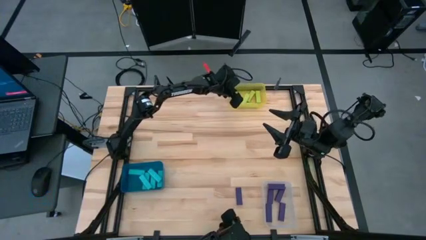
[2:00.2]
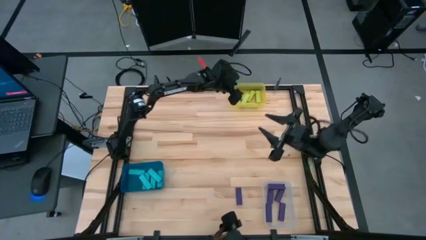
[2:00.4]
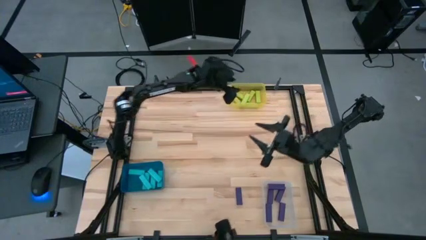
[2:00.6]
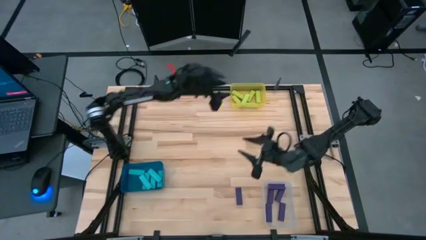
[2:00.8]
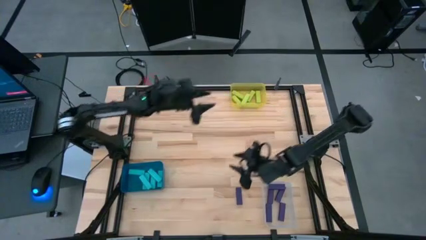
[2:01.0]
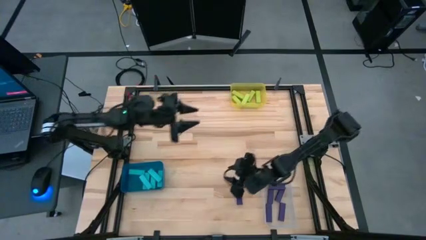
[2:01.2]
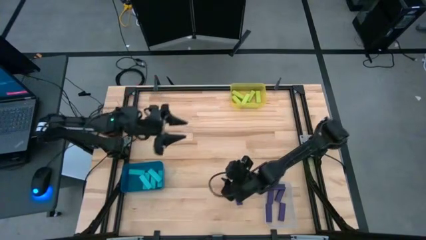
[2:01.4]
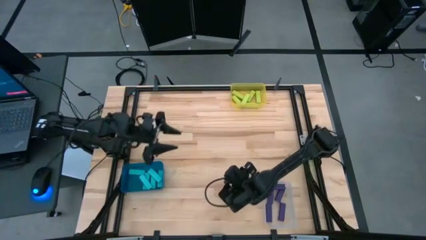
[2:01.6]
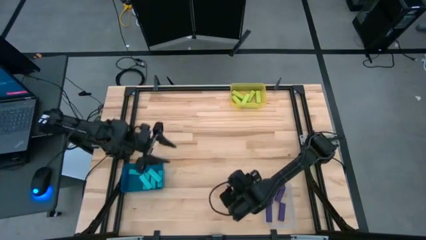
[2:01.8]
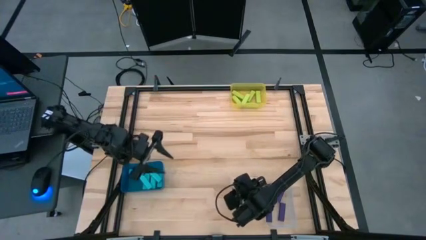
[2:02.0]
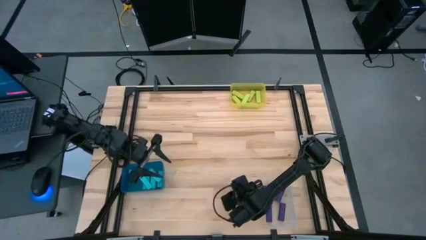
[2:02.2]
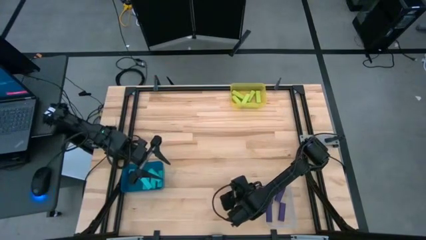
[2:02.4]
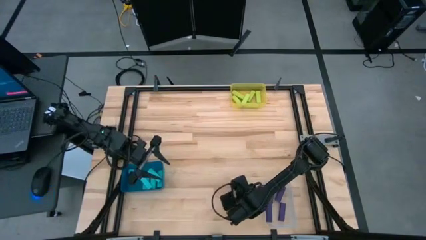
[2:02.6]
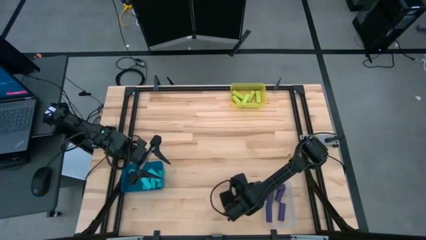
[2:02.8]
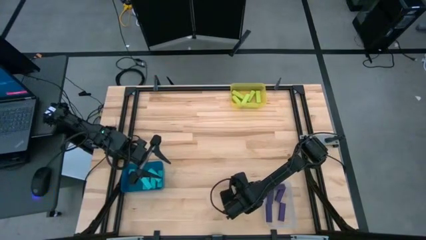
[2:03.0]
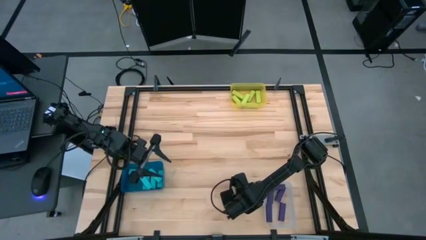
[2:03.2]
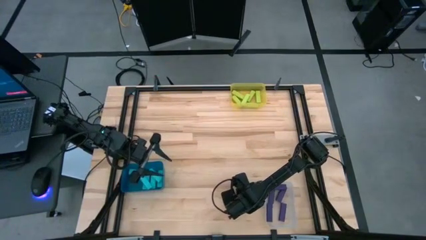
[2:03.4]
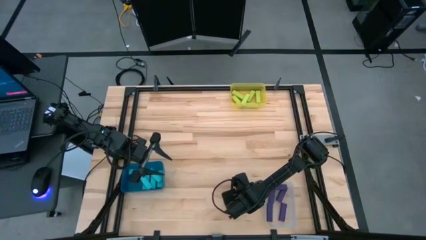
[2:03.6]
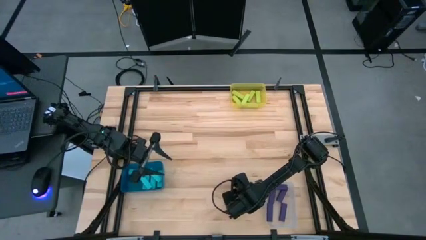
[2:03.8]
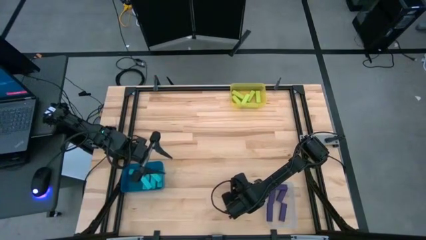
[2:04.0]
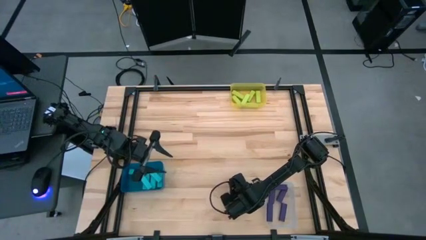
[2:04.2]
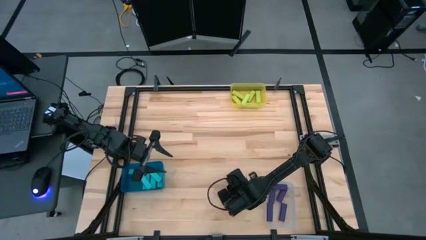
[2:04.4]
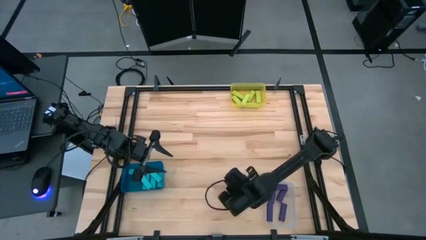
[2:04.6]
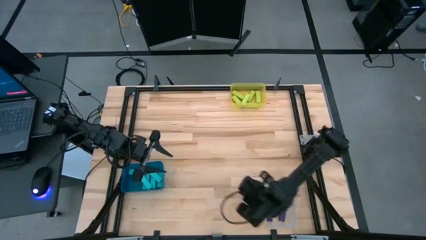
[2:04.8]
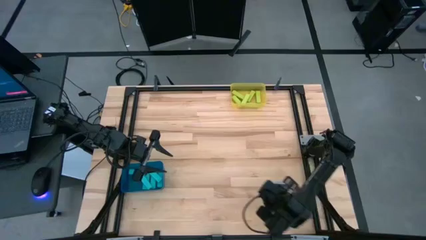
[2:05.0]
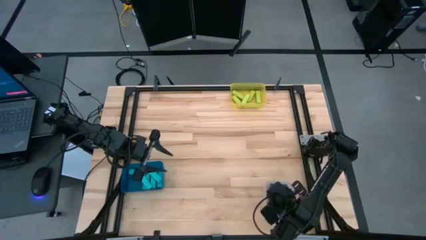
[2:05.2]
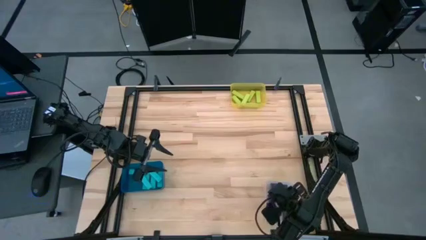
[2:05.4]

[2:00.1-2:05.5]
Task: Sort blocks
Put the purple block into the transparent bin

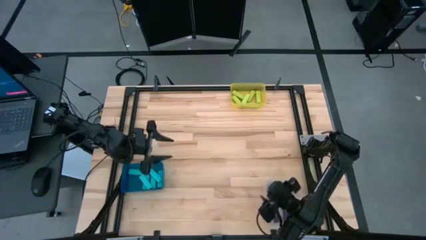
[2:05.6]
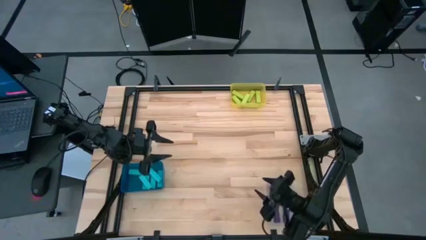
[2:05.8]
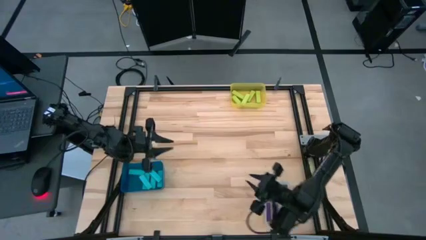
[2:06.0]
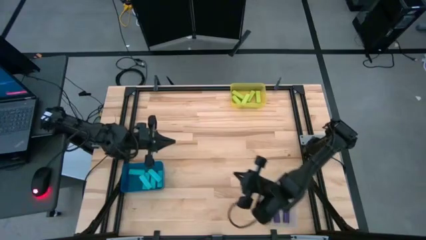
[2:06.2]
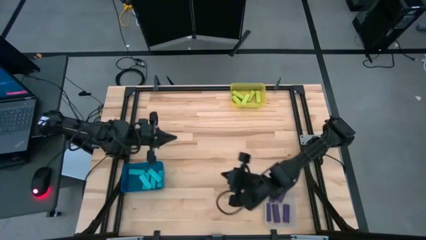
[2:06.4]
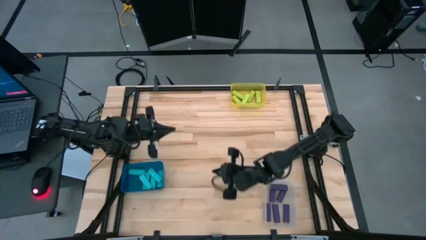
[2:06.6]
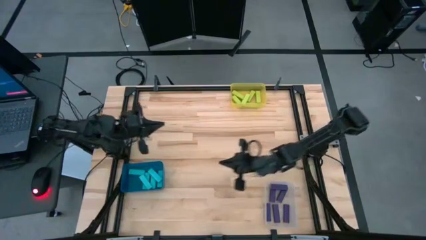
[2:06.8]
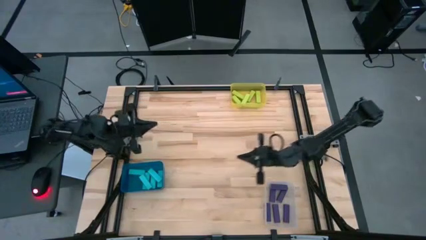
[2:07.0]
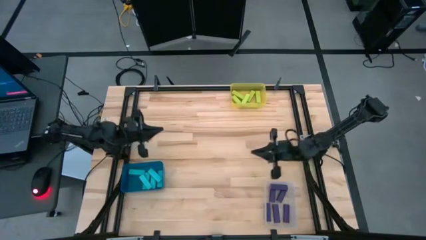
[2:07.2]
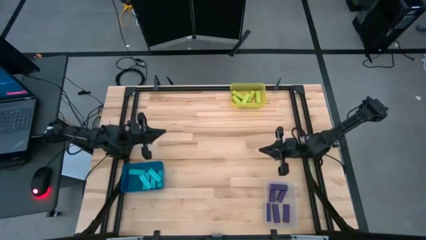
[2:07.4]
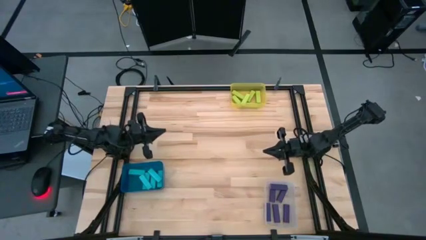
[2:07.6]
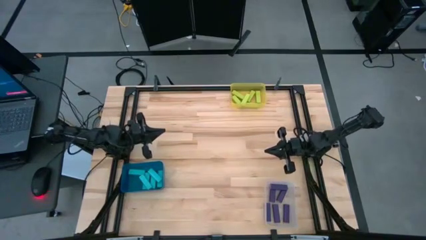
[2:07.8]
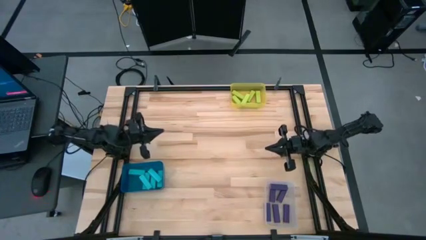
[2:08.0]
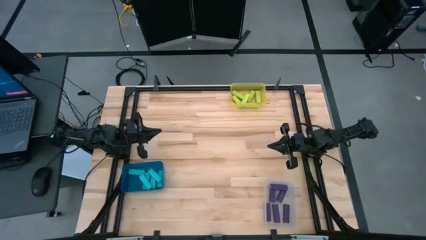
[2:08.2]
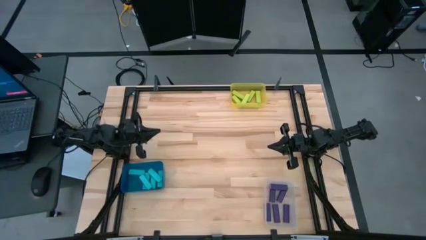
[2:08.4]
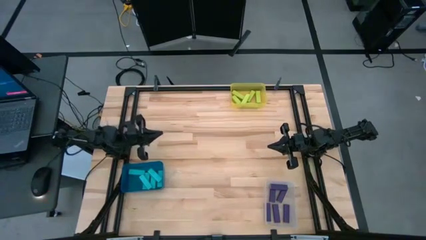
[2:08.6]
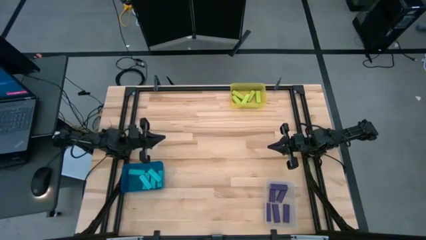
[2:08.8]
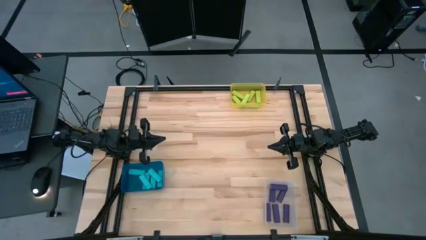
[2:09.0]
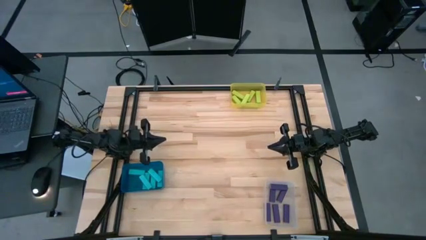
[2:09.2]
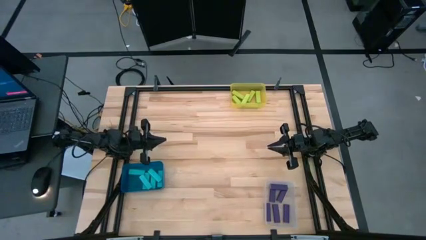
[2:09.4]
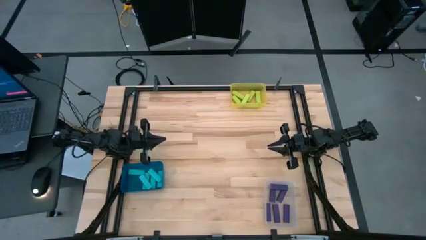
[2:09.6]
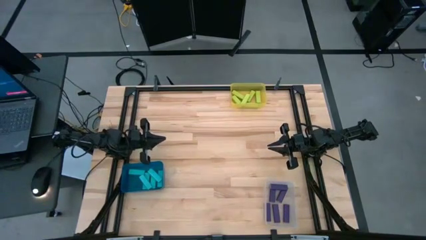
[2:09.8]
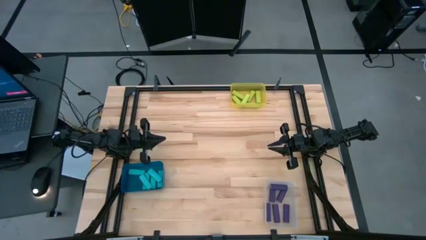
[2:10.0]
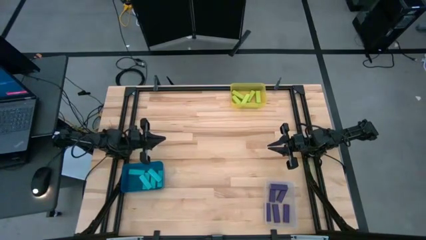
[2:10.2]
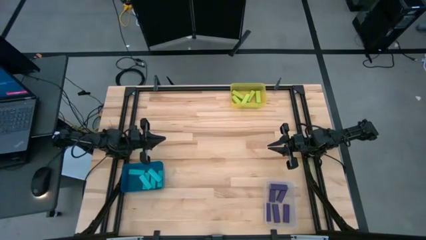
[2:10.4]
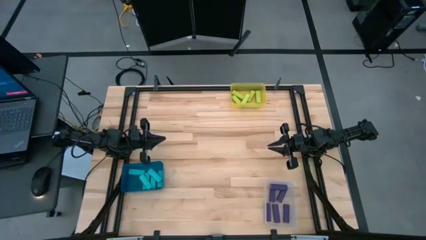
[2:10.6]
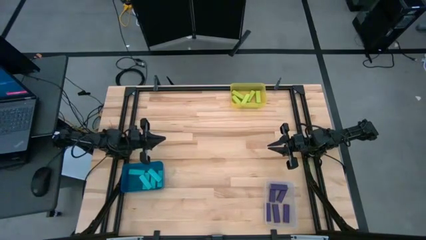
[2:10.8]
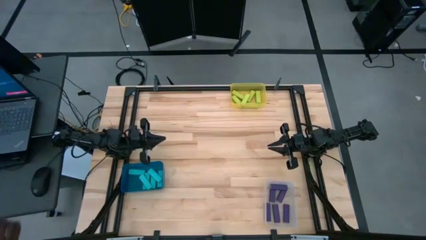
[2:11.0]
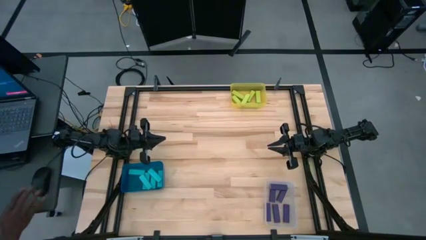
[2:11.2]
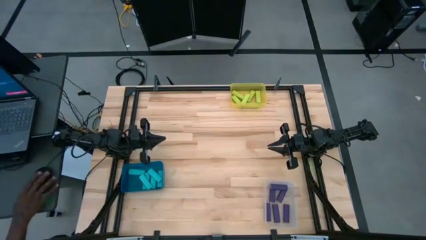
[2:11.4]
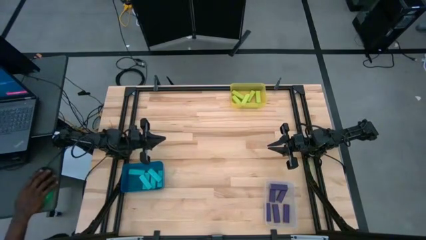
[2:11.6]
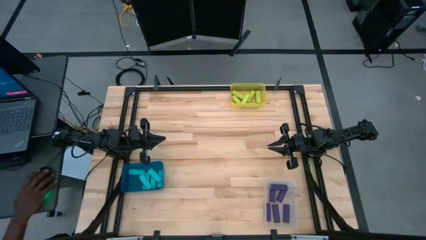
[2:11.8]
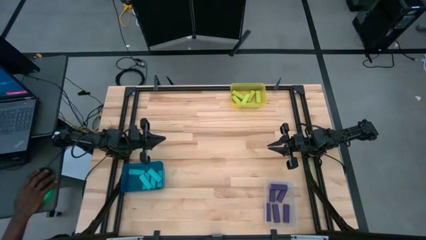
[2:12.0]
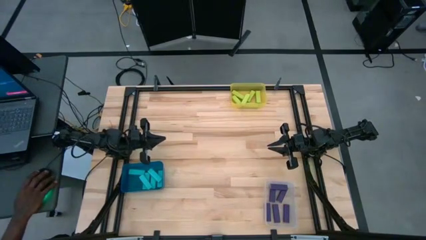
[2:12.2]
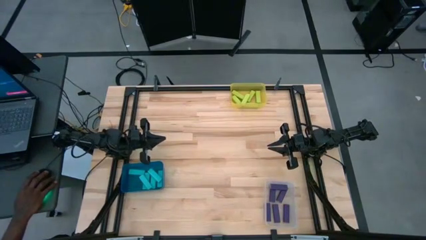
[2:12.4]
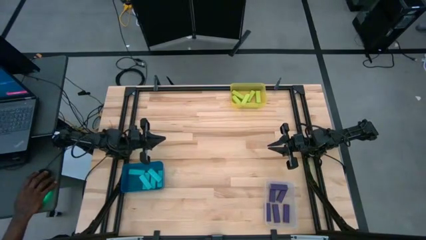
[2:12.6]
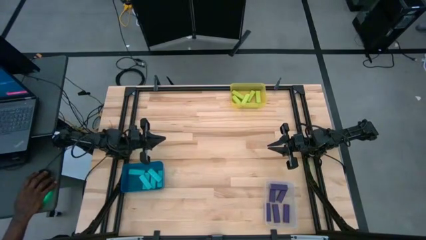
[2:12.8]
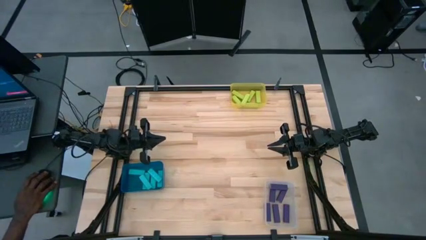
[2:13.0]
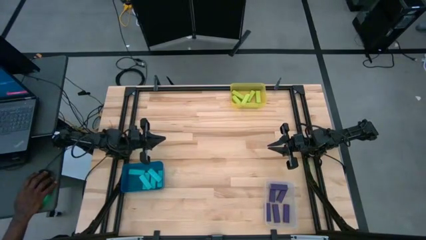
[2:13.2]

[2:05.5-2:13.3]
Return to Home Position

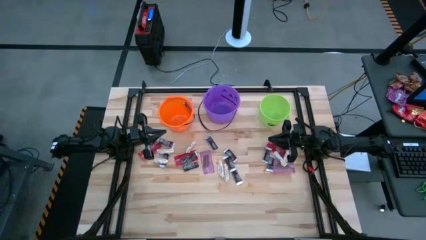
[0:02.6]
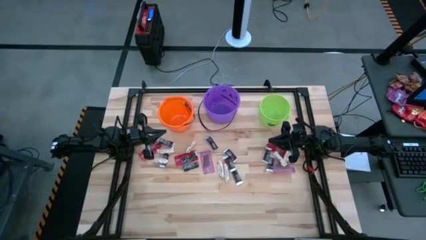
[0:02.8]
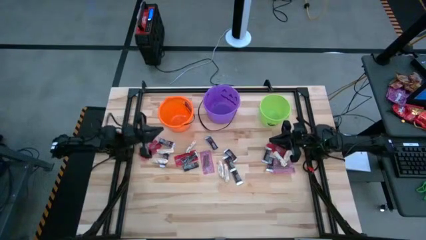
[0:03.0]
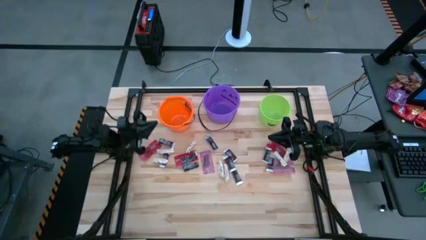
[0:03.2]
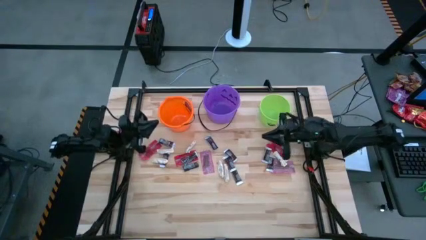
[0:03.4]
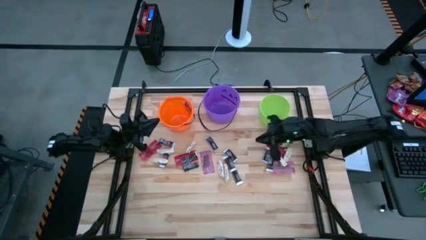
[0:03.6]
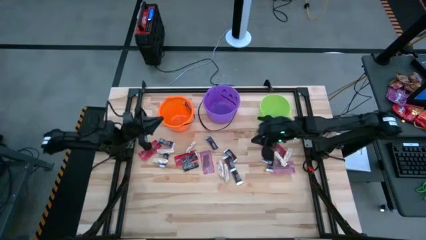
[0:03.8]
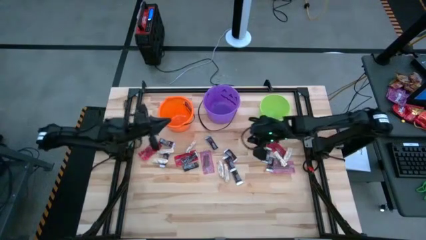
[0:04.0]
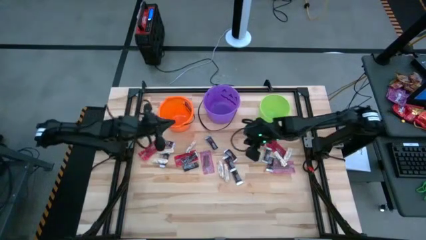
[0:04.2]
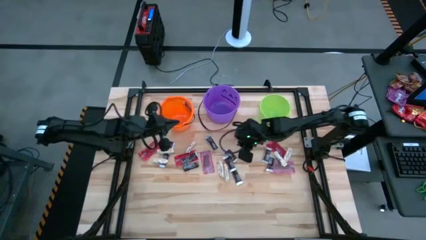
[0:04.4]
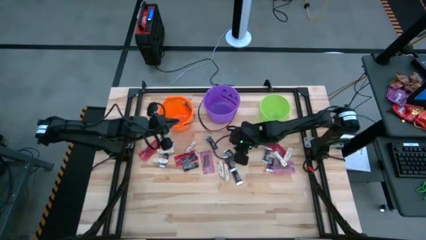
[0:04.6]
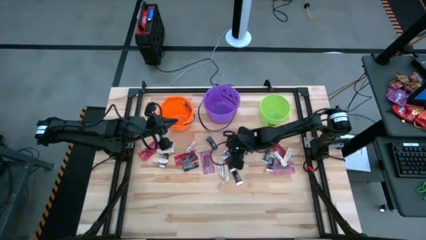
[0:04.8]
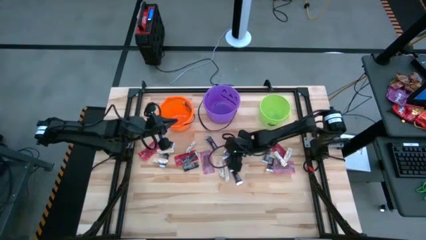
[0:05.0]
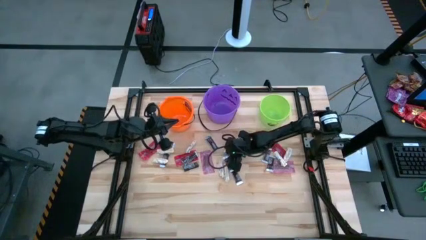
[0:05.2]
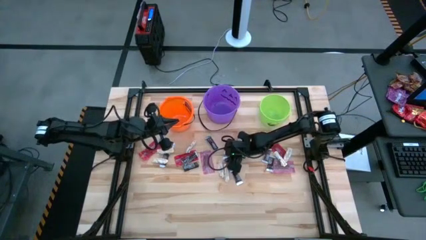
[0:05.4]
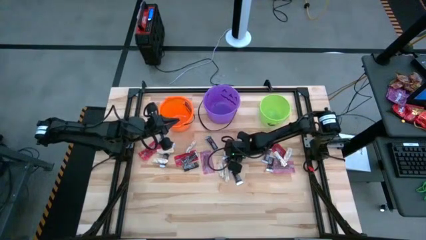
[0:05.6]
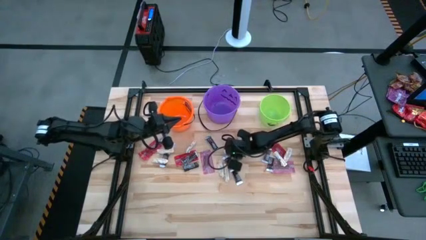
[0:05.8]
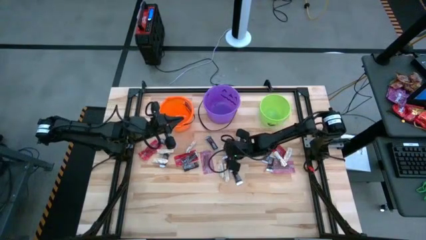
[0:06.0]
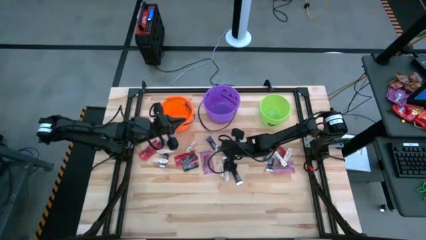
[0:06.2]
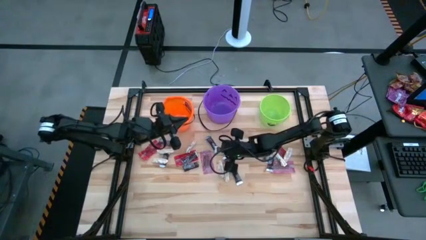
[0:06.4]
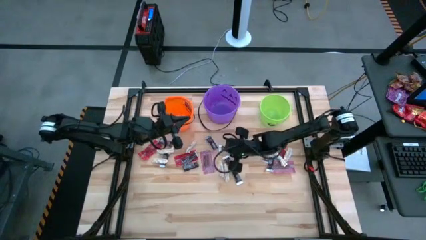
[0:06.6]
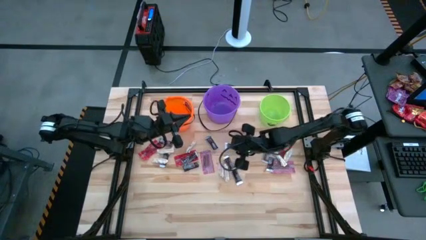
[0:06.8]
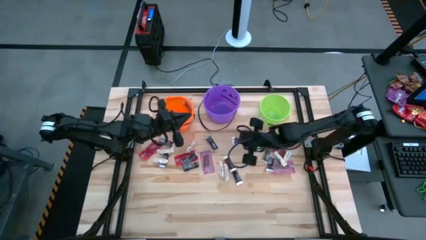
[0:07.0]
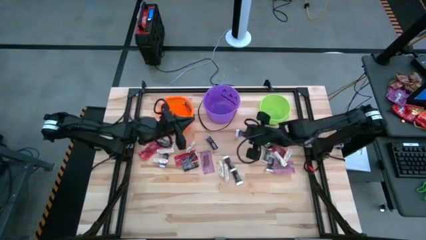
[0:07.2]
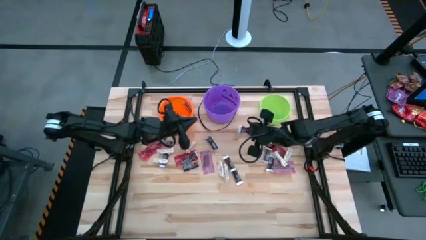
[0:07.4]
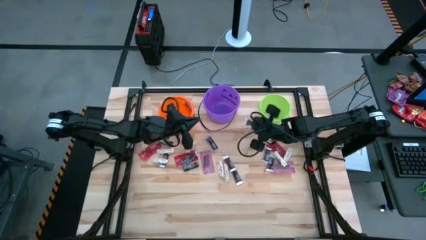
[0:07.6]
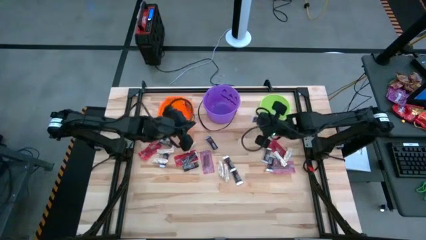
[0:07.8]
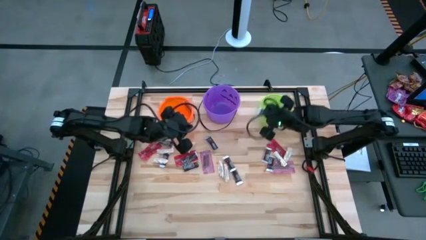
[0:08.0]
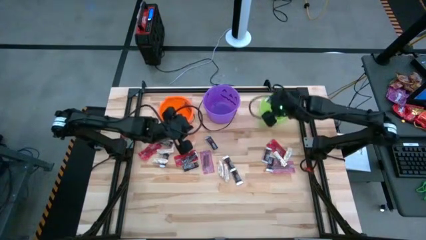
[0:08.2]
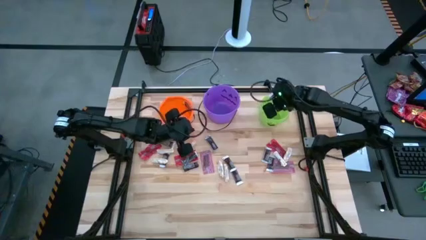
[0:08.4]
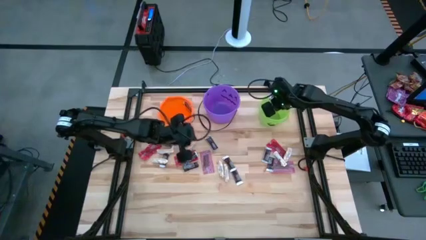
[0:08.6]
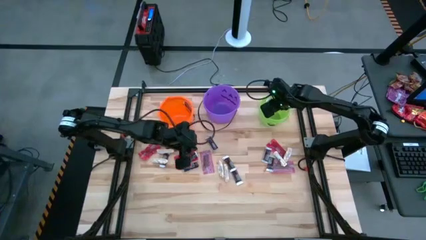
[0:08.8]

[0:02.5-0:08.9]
Task: Sort candy by brand, put in halloween buckets
Put the brown chocolate bar into the green bucket
